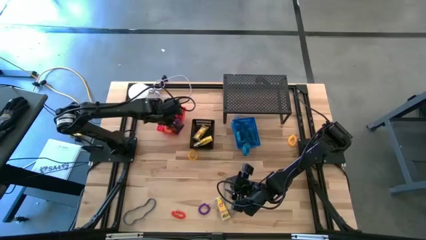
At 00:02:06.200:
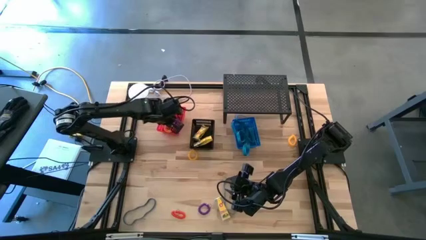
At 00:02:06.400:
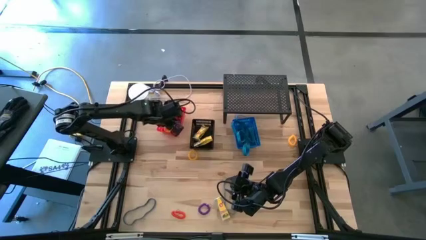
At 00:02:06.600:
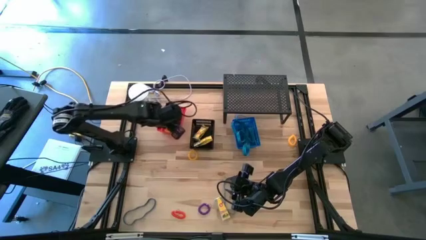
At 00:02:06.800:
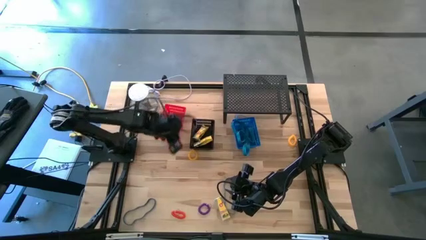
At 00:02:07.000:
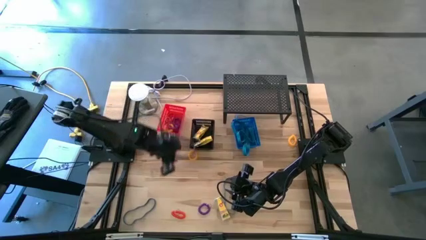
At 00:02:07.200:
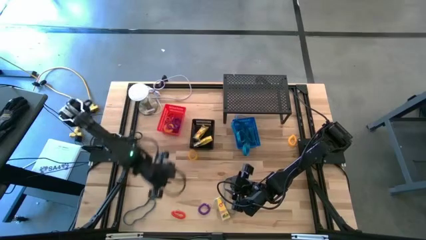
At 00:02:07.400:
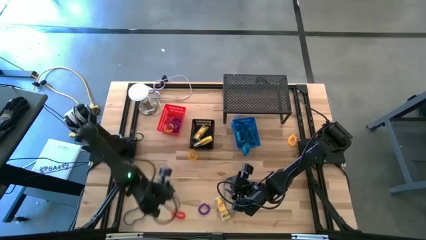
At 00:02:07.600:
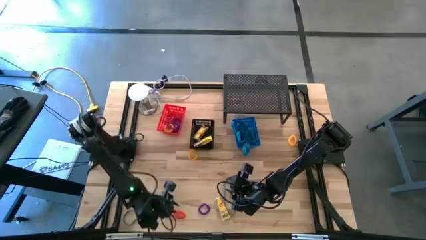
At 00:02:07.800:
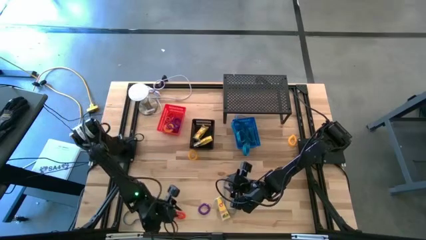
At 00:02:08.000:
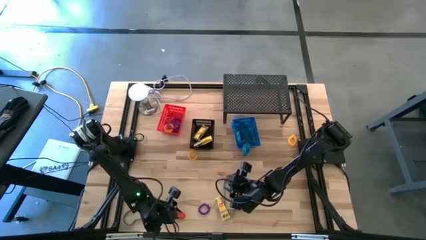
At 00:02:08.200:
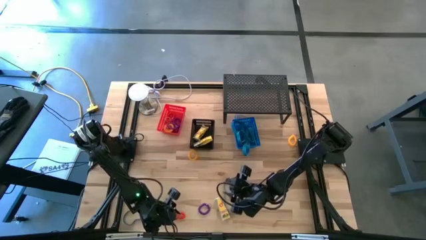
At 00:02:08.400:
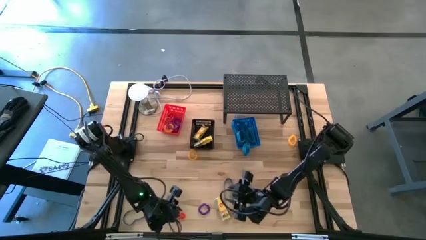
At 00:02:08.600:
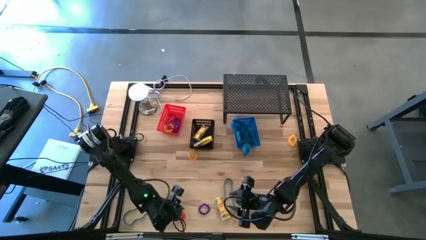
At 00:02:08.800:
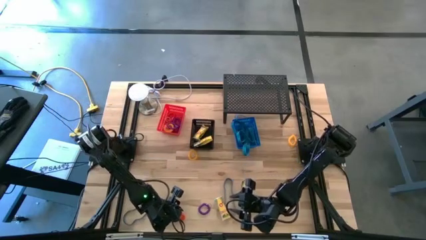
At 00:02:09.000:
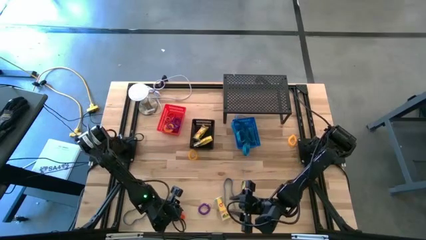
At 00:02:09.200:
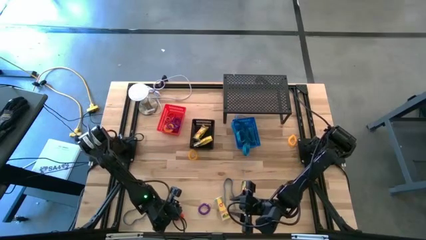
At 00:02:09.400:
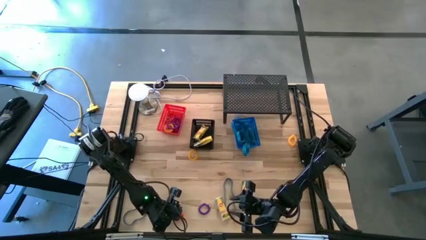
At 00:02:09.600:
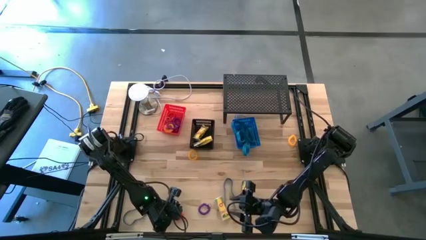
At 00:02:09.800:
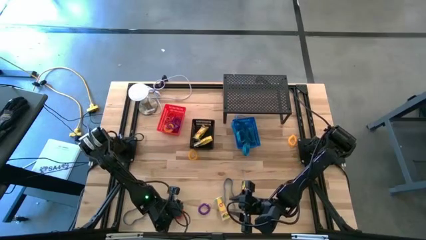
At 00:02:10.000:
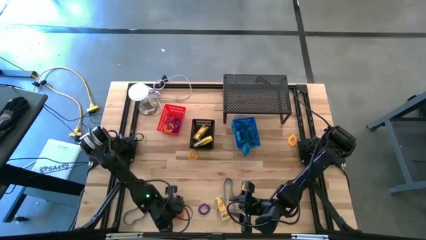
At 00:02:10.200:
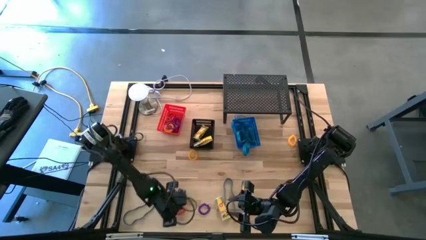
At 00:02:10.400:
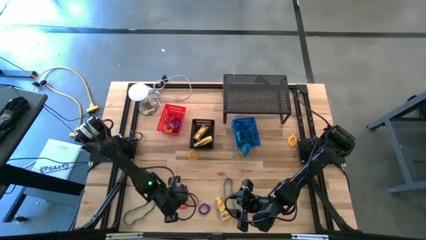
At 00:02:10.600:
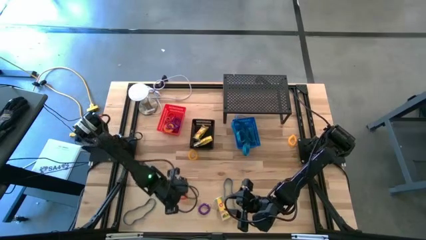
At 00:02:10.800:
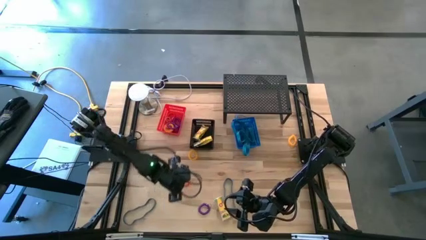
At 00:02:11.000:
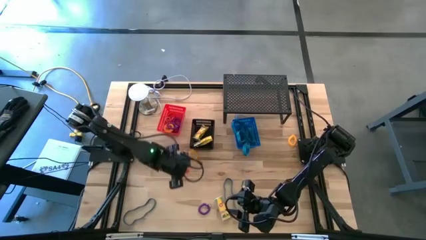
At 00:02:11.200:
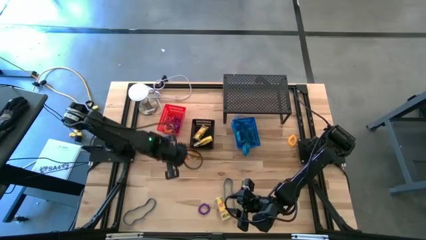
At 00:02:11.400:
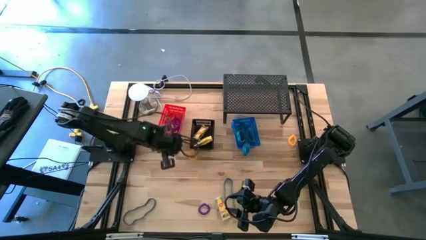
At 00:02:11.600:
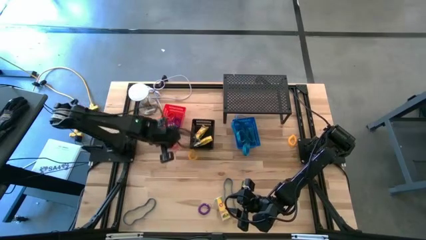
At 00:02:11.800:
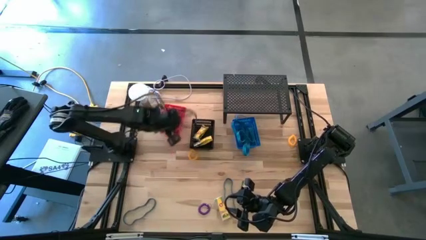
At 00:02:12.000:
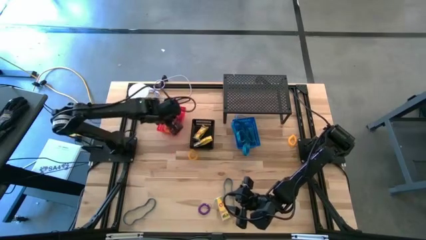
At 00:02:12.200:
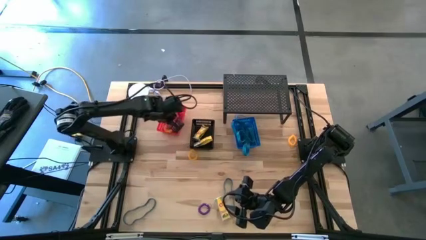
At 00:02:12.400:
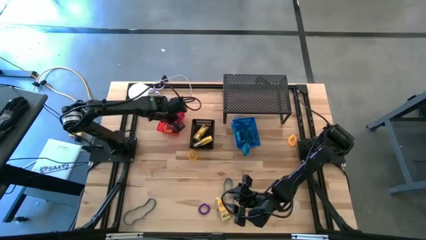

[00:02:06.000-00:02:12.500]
Task: Pick & Place Office Desk Supplies
Put the orange wrist coil keychain into the orange bin

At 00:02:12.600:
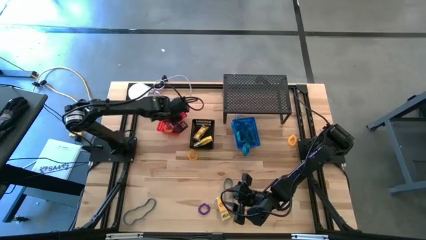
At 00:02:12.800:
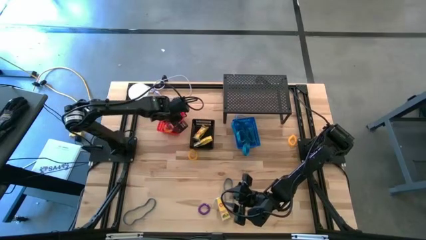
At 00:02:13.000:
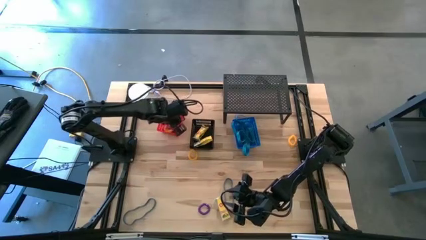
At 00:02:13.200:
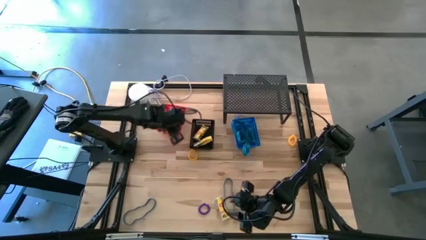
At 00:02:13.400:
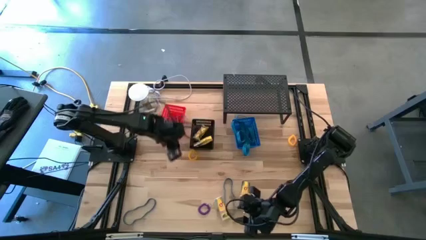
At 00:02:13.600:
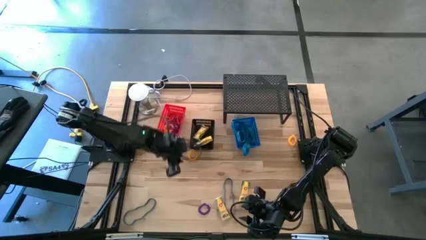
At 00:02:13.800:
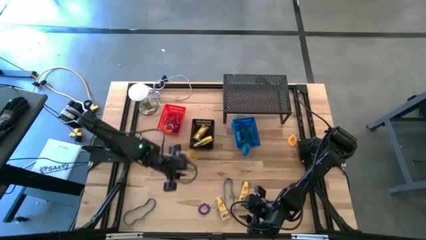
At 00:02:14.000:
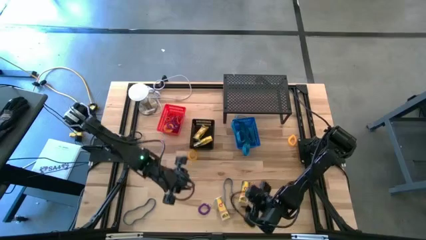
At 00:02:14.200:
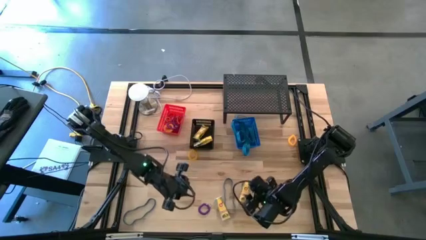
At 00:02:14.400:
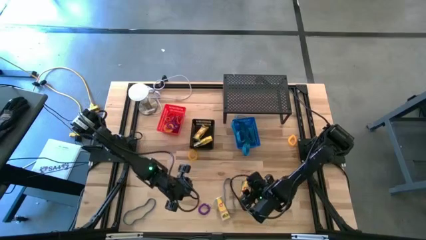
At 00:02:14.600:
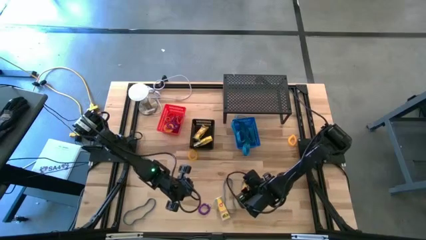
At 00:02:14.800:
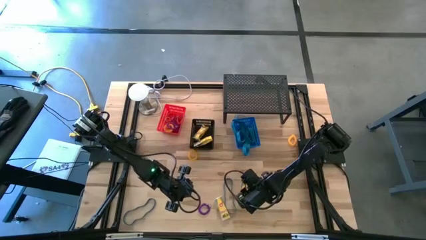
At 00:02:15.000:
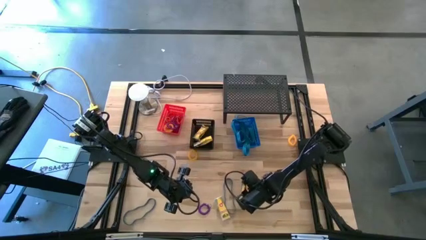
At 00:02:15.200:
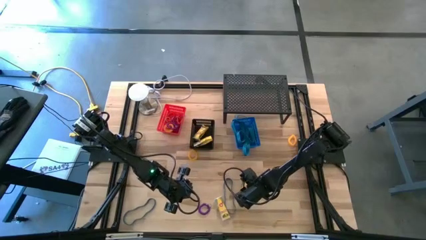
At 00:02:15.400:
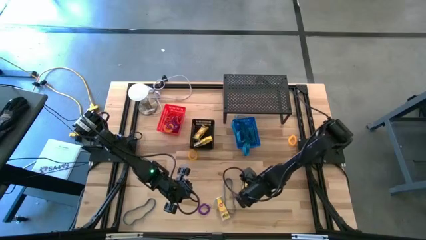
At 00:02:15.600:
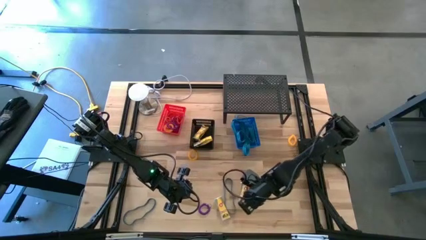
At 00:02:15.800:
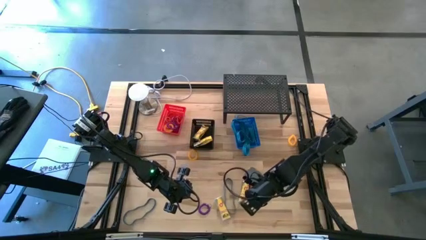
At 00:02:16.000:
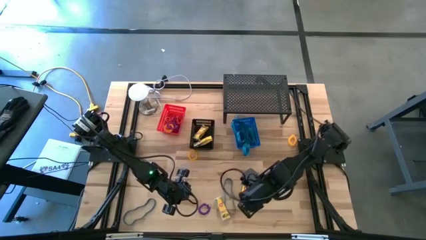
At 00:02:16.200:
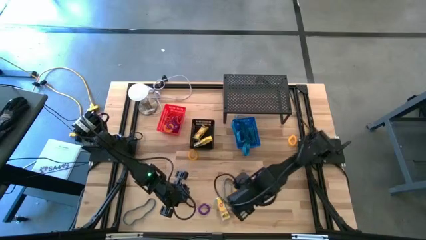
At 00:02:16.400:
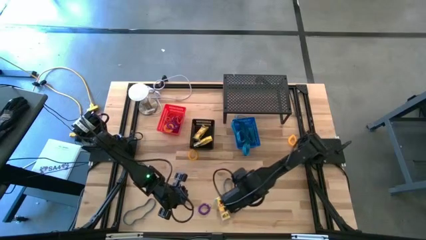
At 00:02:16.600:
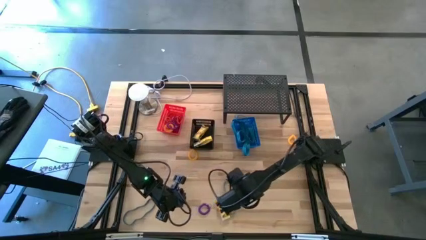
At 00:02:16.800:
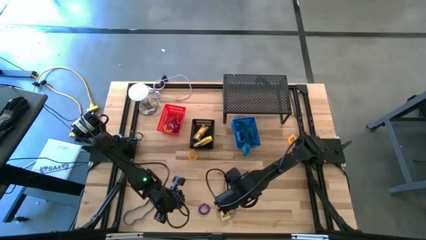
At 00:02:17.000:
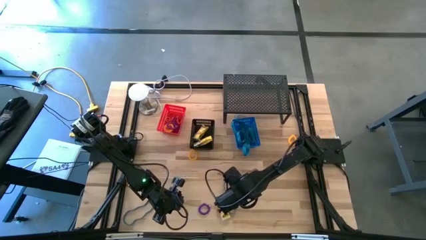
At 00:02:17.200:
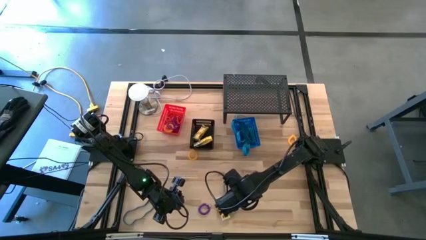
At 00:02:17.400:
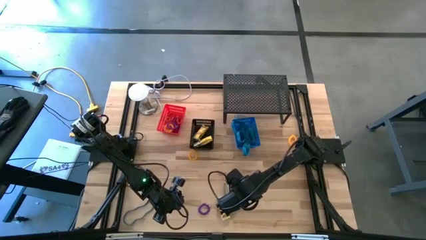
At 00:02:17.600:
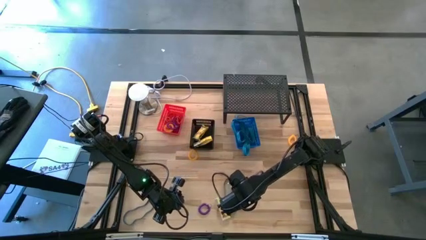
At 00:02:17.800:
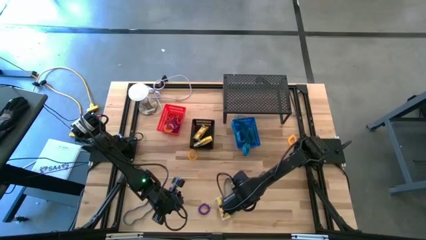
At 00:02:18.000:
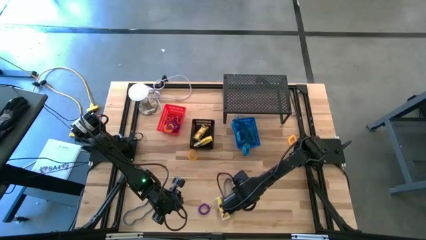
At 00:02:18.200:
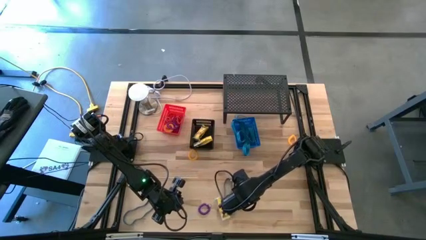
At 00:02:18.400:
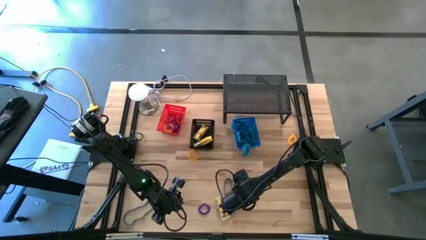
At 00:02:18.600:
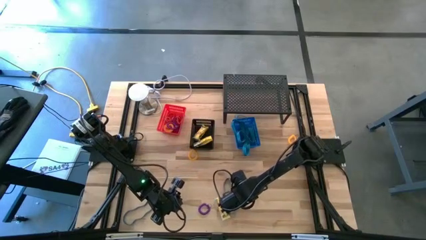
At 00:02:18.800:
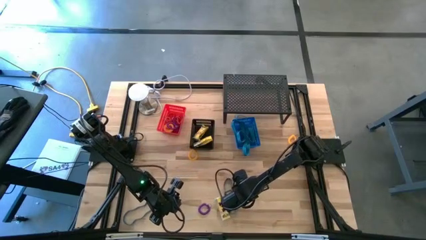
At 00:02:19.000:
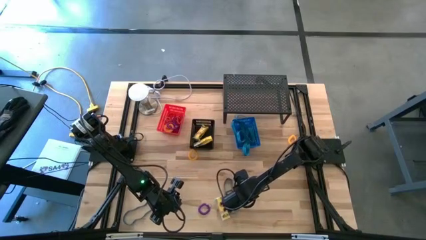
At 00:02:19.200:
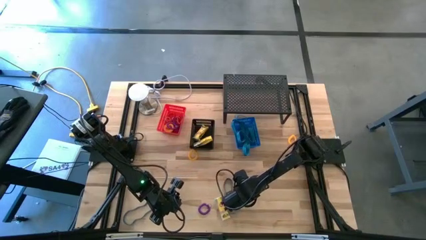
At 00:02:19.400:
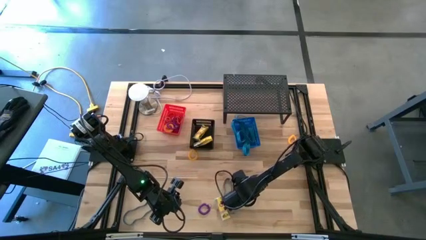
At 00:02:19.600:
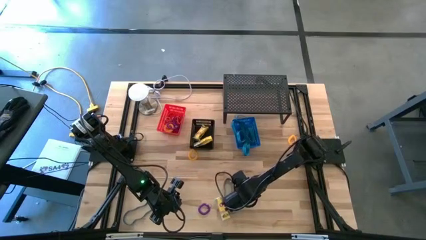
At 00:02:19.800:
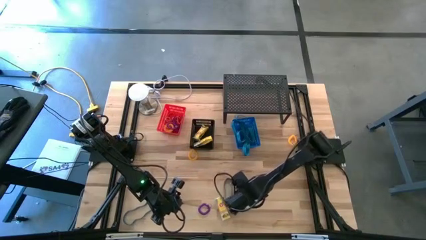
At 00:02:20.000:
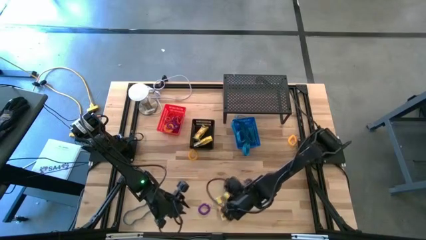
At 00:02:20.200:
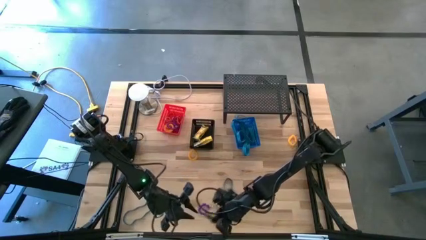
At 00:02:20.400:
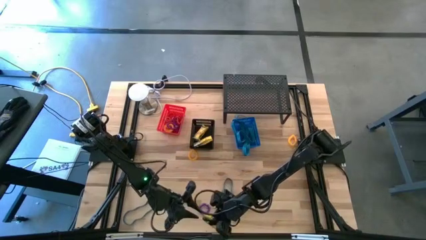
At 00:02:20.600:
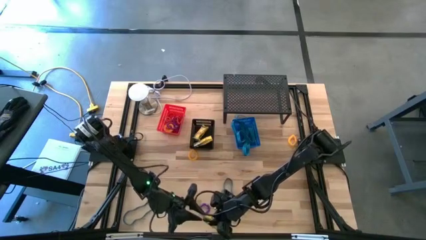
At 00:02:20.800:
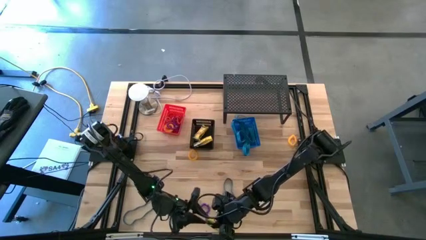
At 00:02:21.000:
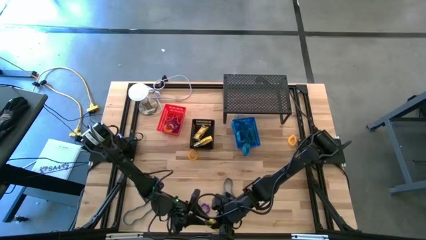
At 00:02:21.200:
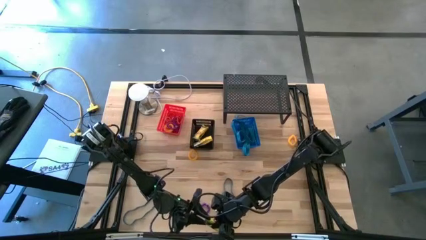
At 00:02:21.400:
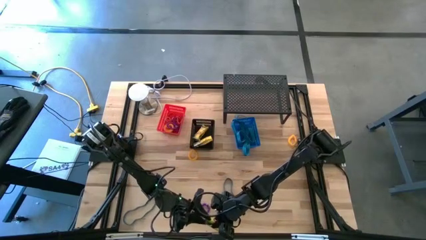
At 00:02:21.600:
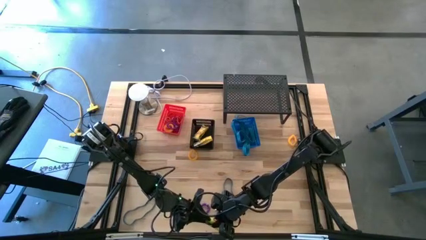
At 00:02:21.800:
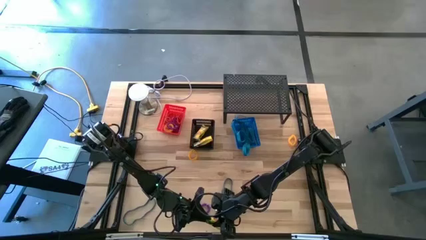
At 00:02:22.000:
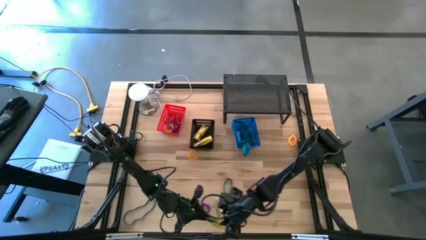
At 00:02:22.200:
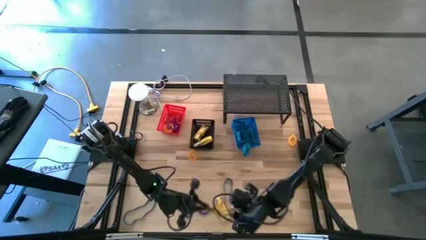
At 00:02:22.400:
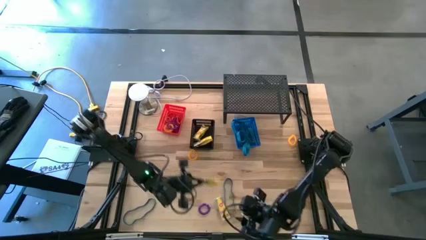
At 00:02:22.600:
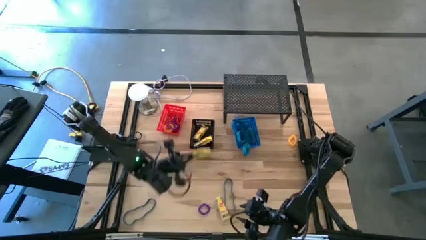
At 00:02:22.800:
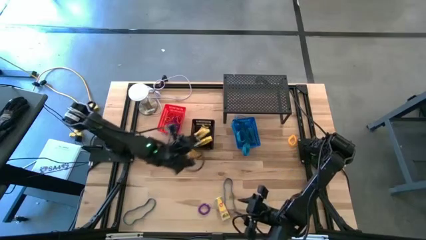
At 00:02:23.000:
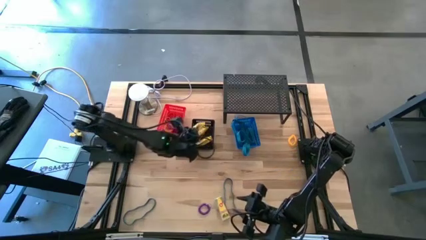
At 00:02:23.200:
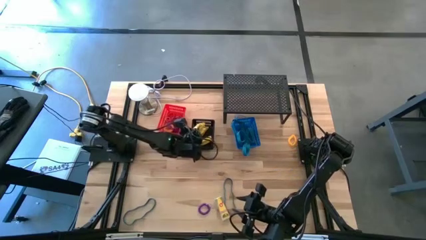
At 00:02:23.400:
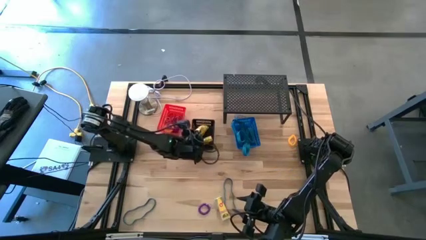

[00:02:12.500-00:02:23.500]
Put the right crayon box into the black bin
